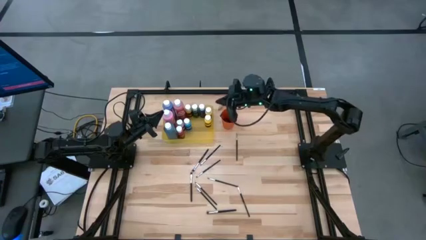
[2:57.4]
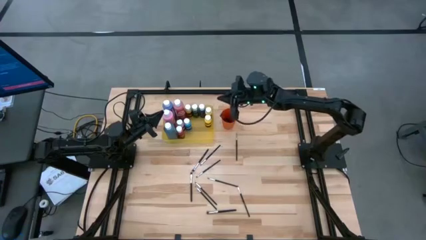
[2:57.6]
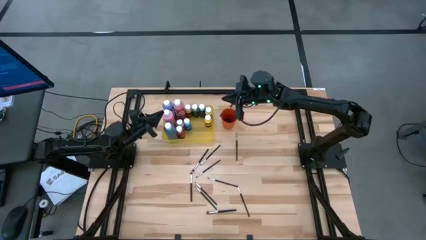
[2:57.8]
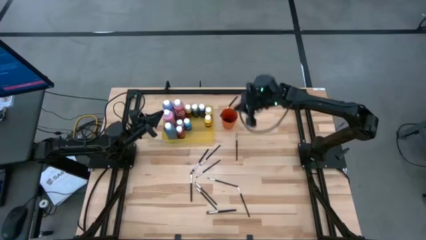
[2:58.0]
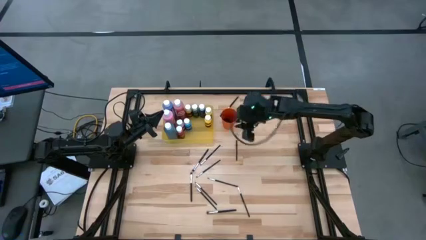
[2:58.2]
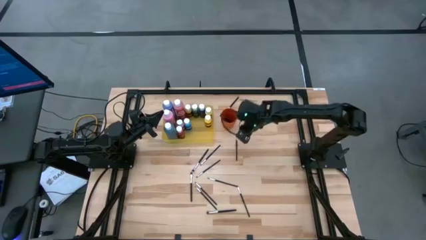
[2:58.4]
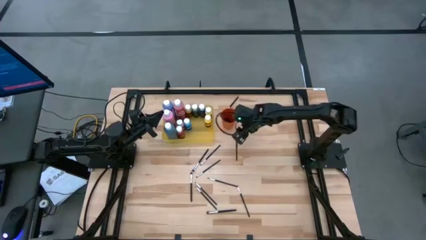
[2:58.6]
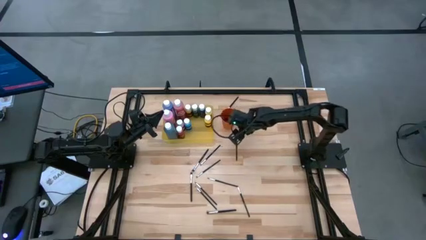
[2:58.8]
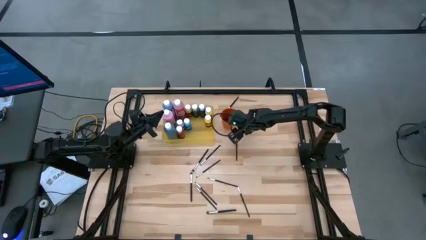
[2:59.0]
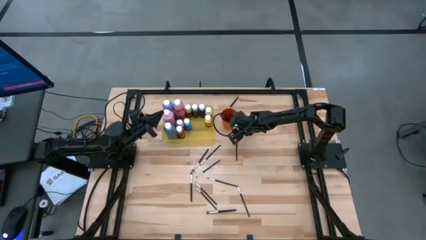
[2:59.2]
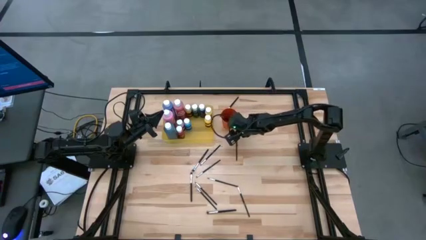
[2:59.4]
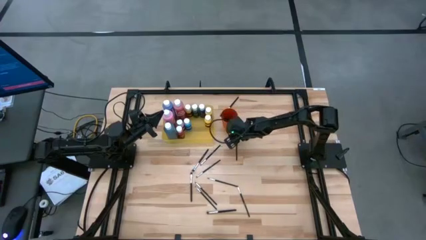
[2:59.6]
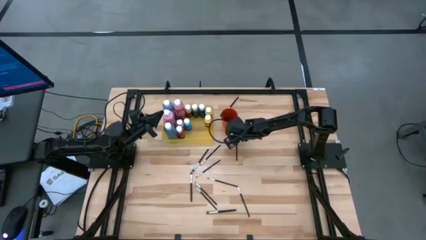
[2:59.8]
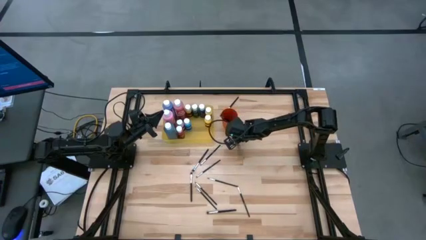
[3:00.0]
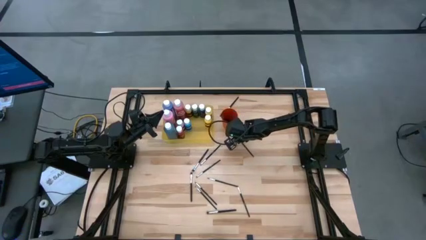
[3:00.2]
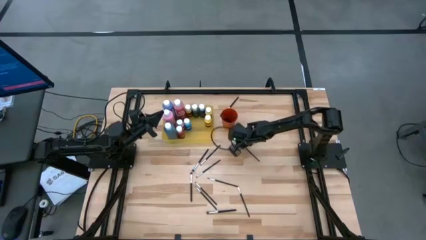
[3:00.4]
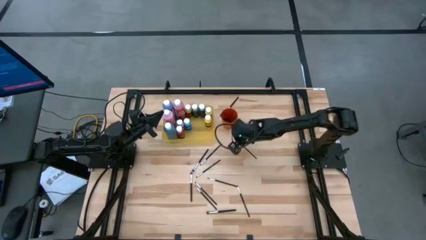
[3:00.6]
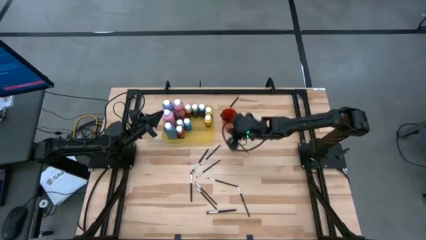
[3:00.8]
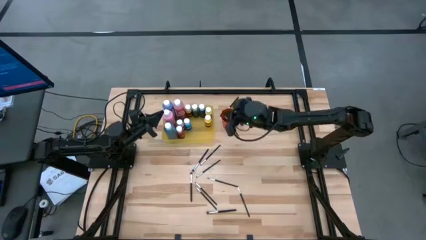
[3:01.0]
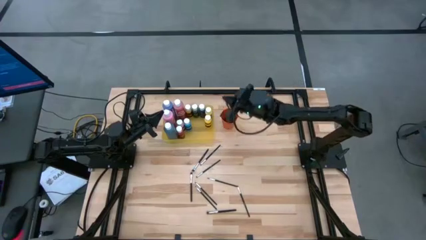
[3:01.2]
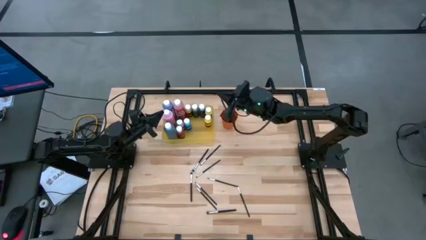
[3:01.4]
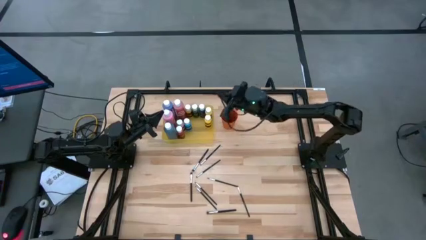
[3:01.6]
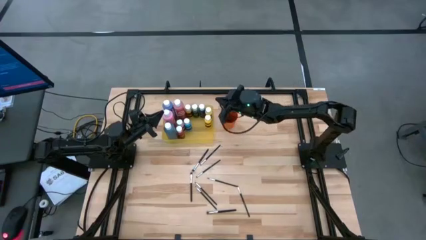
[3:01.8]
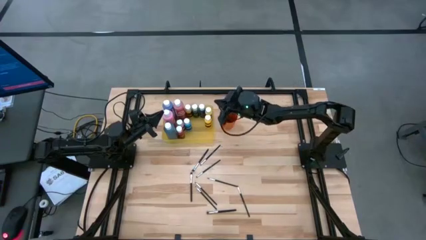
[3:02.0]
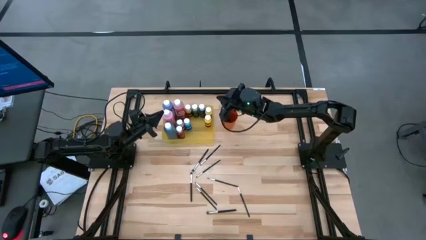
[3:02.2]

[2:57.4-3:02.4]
Task: Pick & Place Paint Supplies
Put the silver paint brush into the orange cup

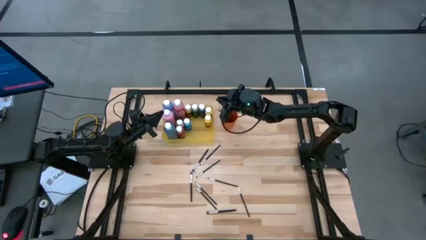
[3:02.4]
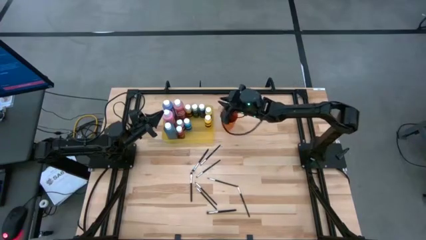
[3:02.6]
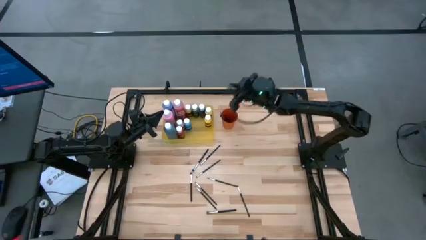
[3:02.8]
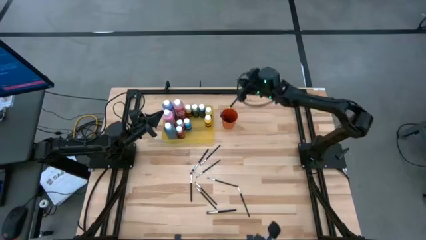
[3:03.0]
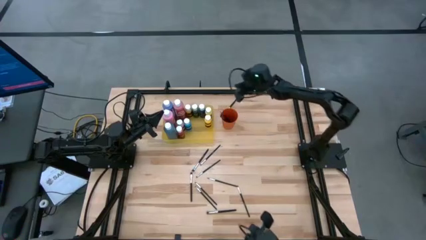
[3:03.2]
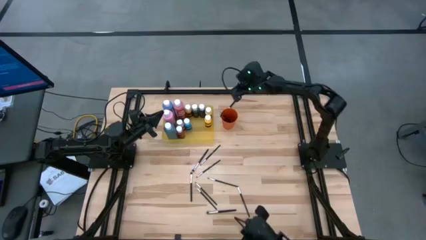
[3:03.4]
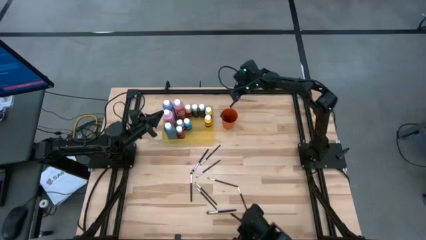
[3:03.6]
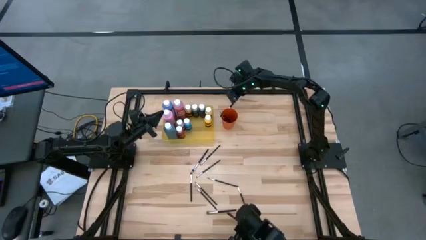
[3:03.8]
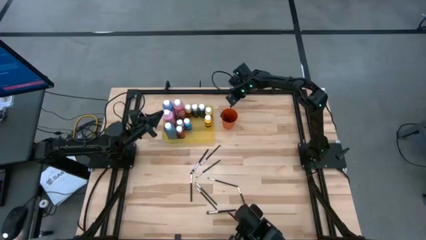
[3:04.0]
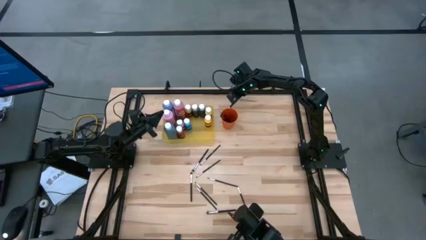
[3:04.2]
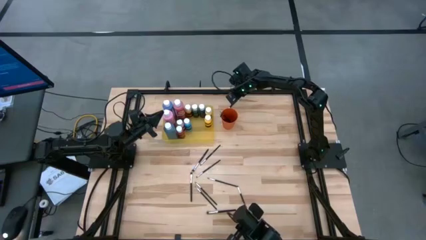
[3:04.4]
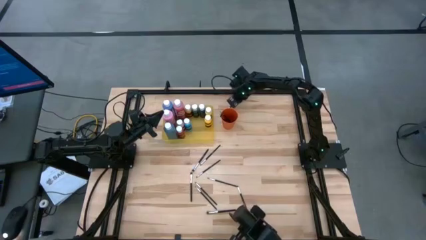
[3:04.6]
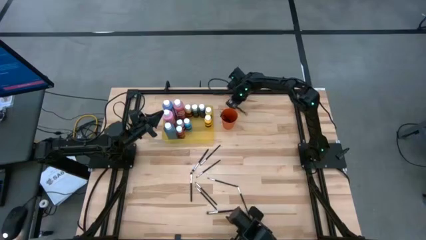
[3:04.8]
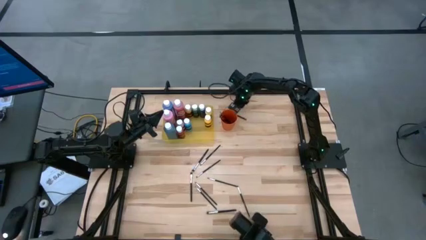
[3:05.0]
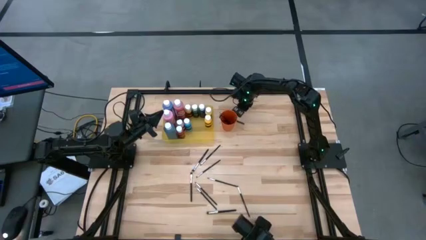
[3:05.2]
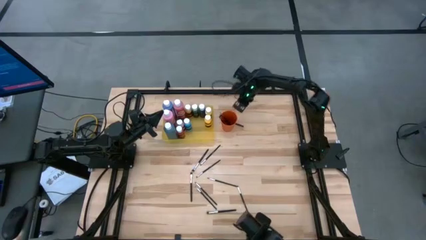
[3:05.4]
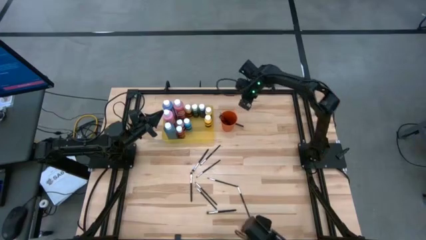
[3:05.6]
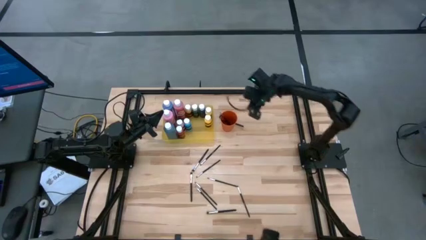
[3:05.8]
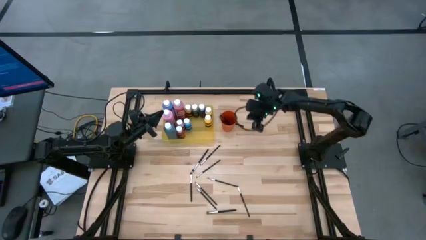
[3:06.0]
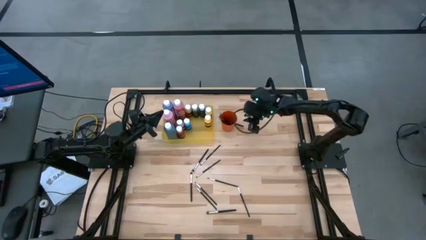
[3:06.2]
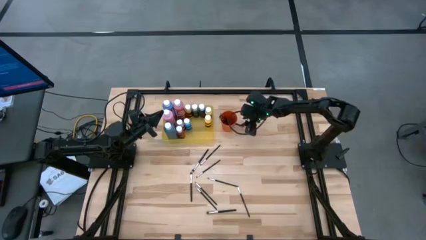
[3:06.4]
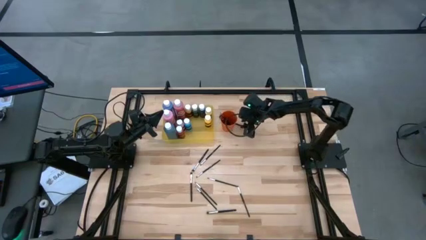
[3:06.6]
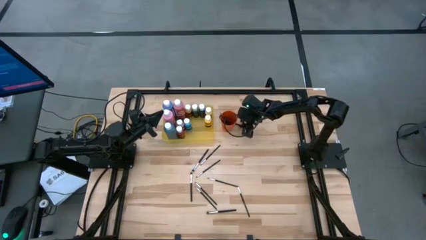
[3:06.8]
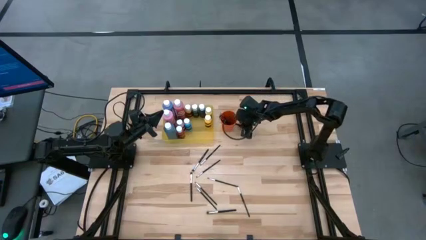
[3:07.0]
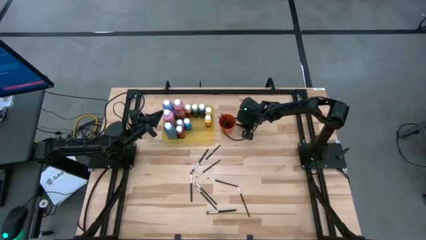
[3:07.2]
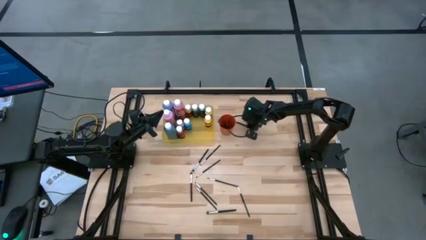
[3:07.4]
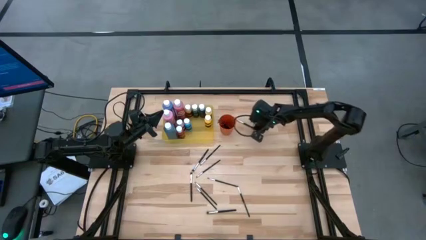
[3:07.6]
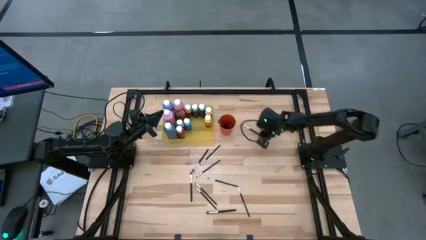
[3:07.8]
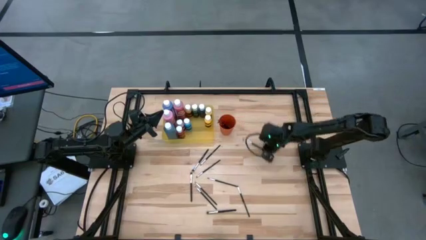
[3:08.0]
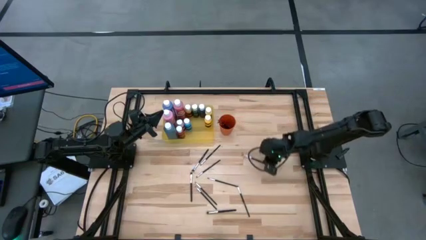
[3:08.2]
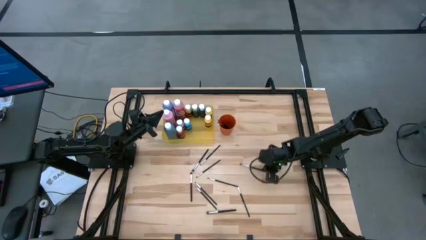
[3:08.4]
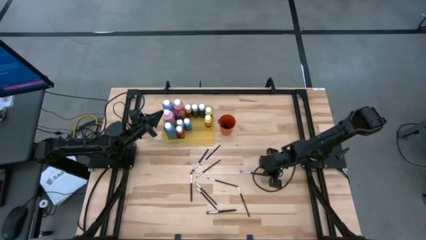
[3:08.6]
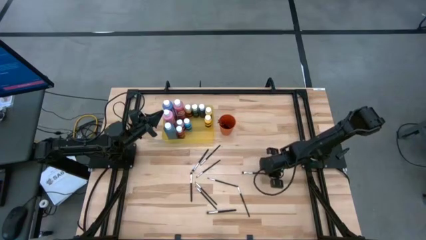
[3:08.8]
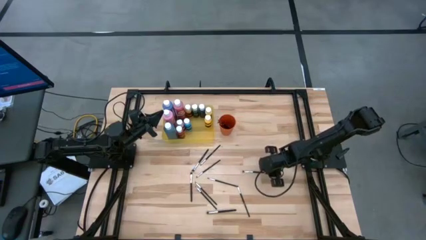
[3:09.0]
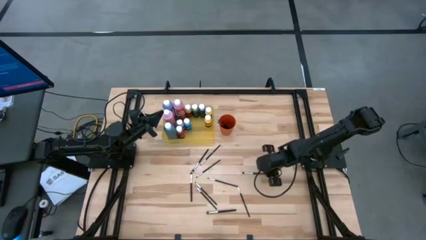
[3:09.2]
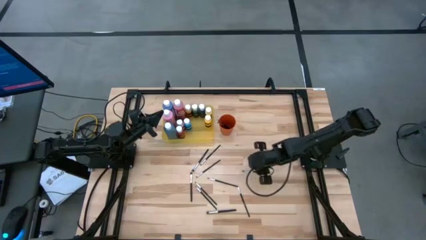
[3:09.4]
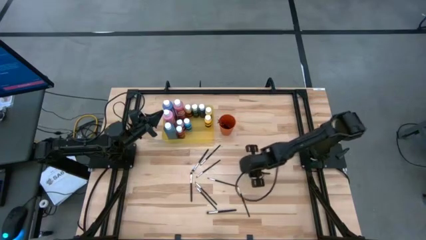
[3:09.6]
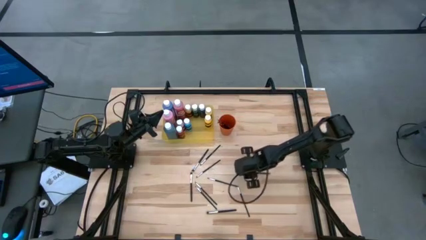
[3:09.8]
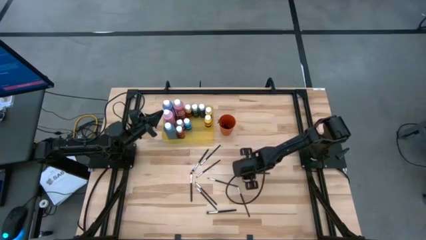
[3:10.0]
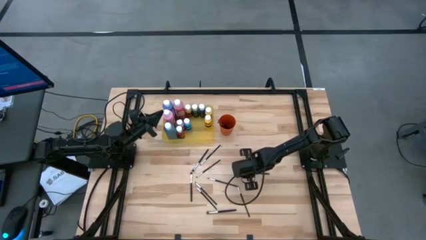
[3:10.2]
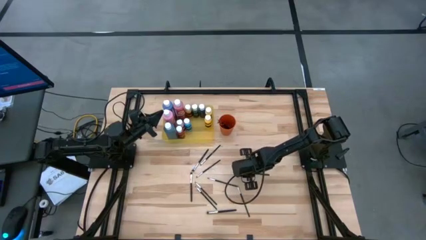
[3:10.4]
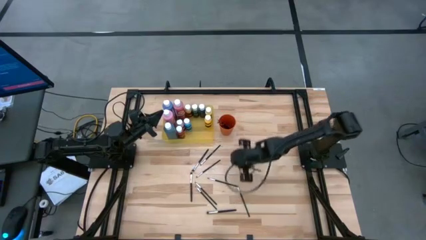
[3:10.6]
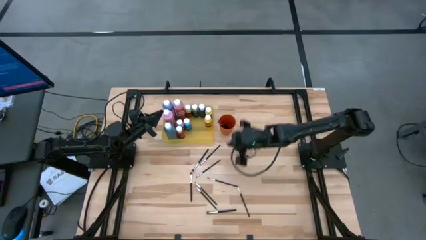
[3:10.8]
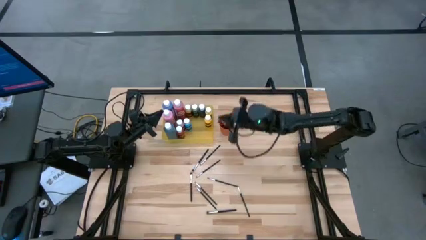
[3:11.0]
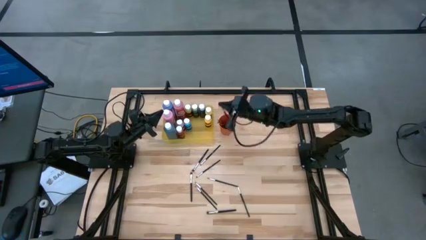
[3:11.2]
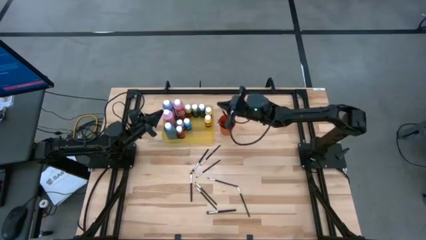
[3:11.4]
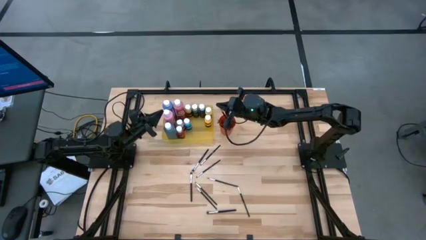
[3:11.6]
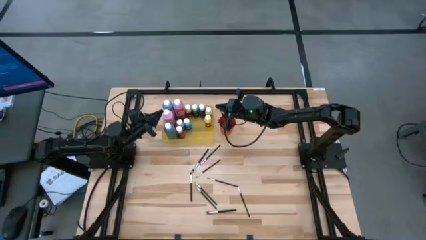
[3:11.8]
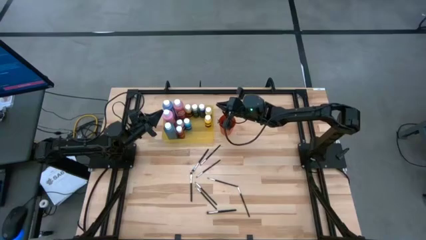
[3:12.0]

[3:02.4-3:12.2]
Put the silver paint brush into the orange cup
